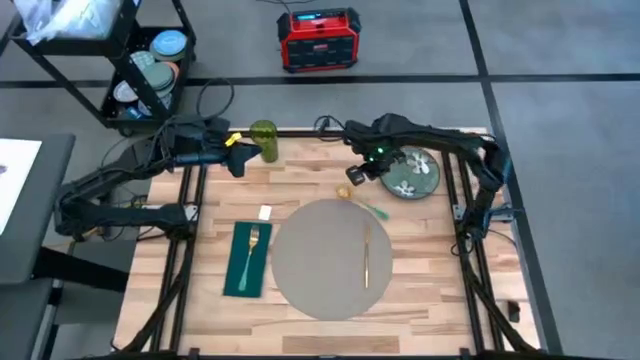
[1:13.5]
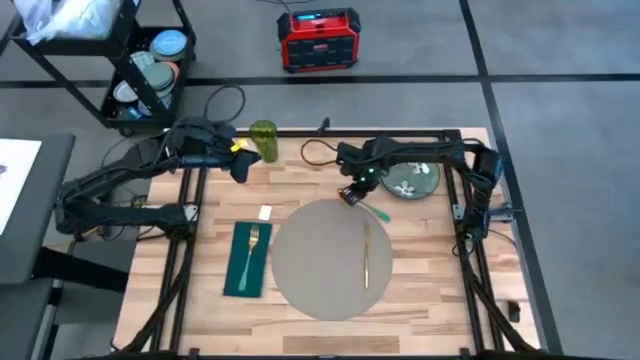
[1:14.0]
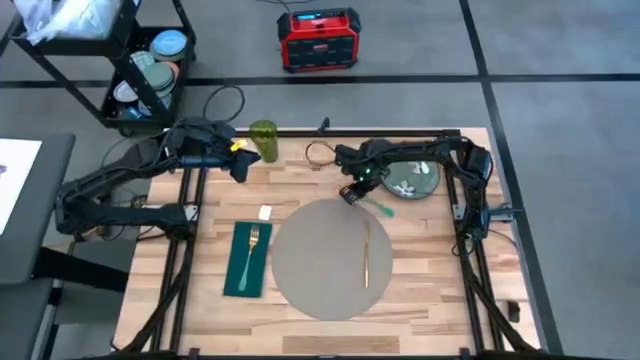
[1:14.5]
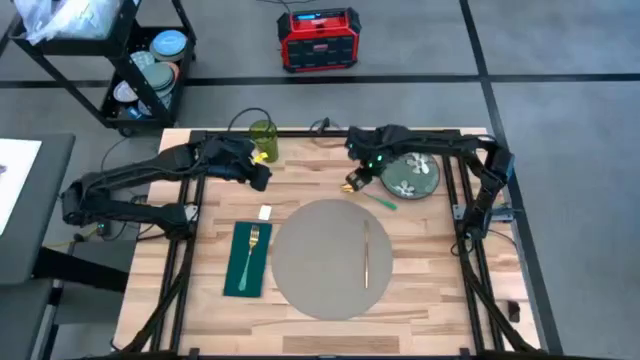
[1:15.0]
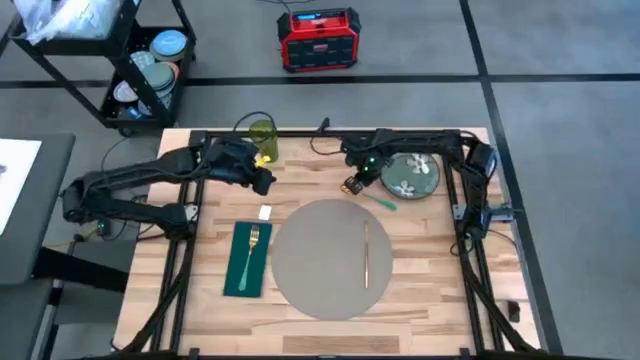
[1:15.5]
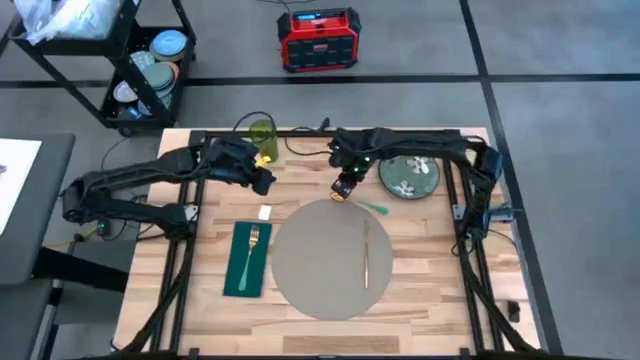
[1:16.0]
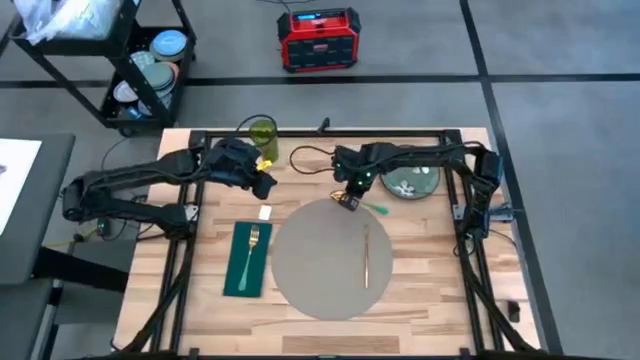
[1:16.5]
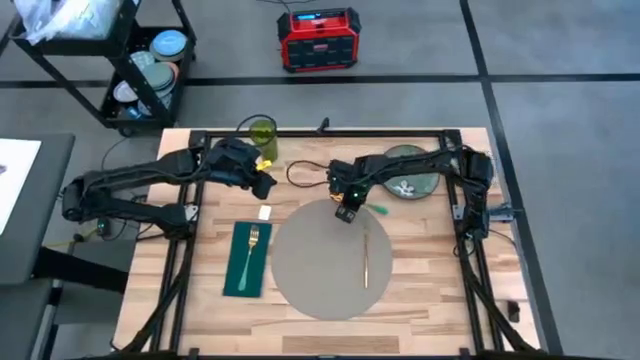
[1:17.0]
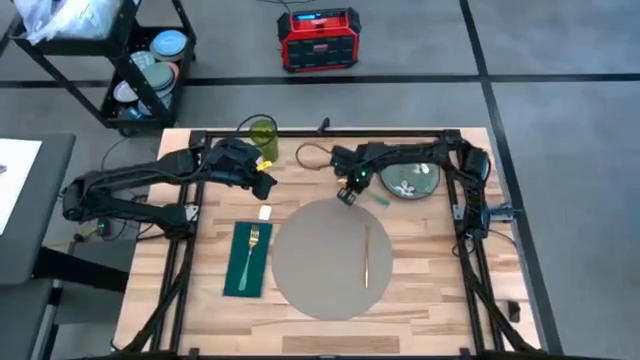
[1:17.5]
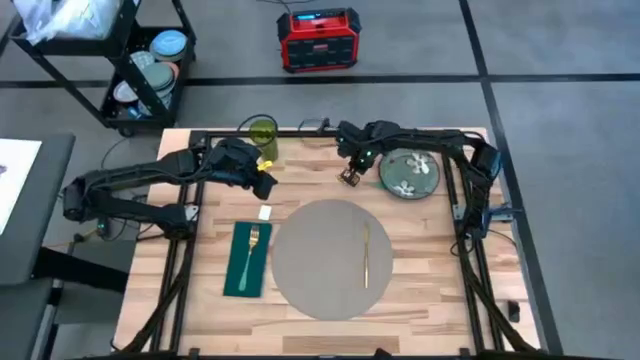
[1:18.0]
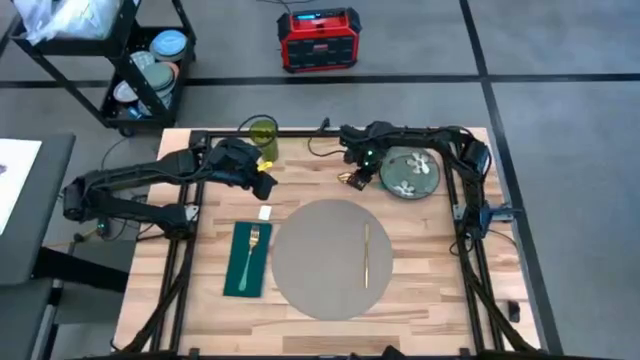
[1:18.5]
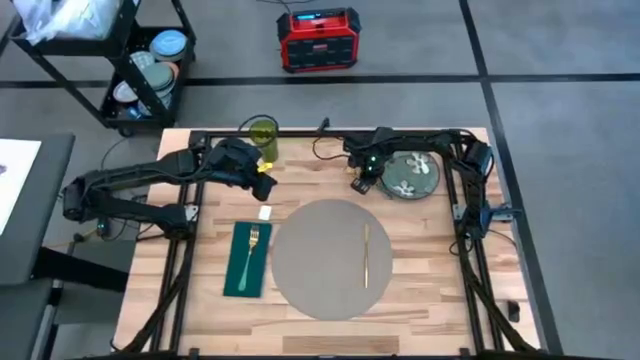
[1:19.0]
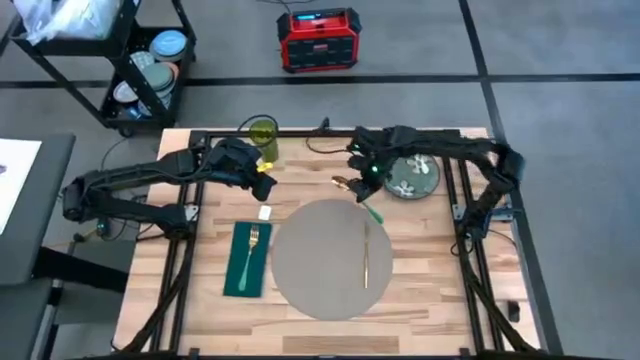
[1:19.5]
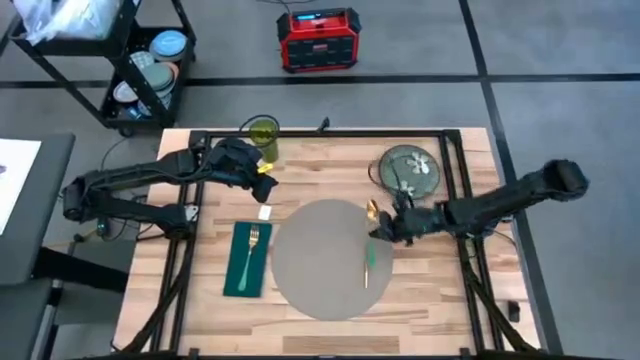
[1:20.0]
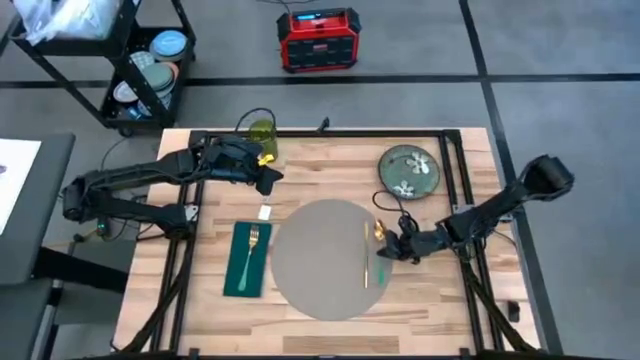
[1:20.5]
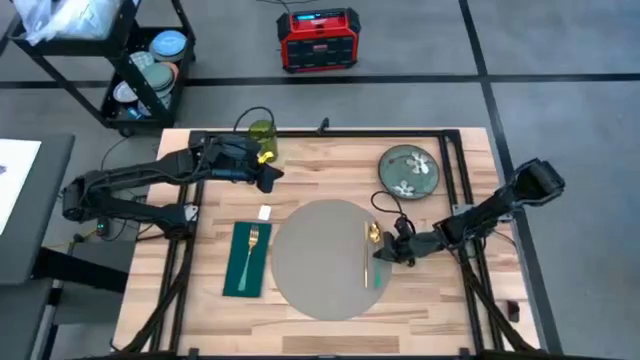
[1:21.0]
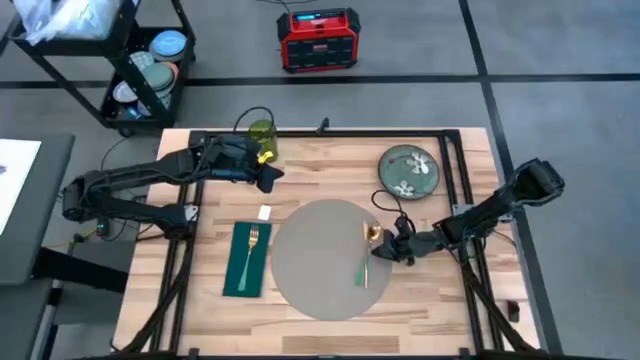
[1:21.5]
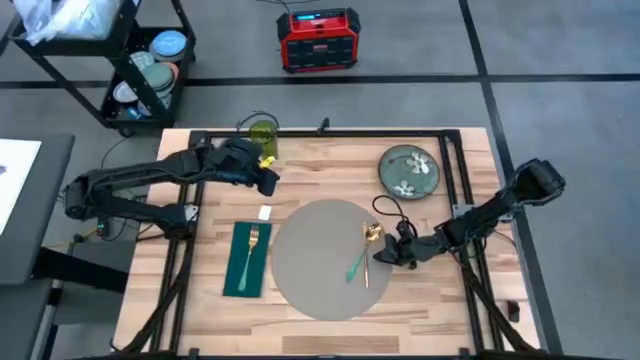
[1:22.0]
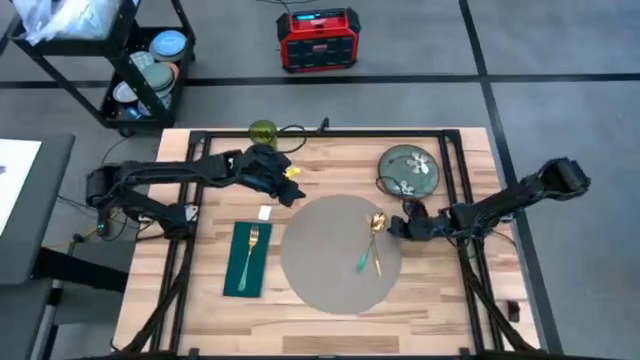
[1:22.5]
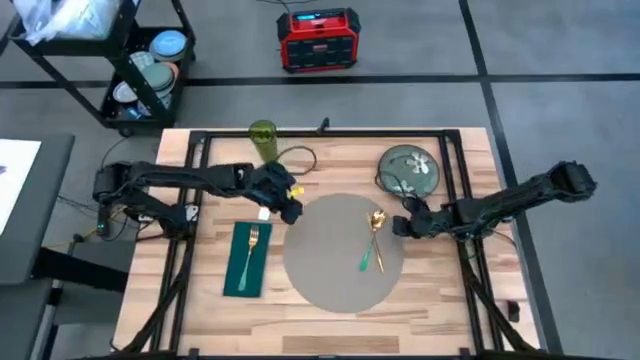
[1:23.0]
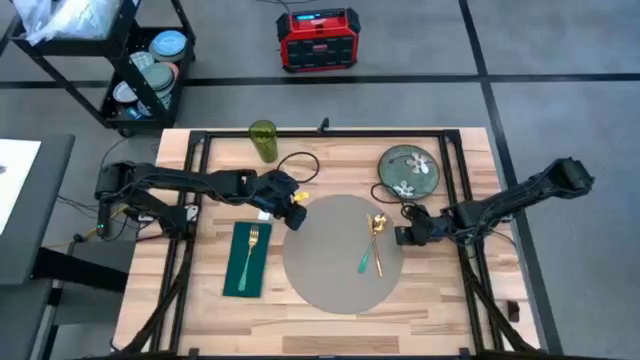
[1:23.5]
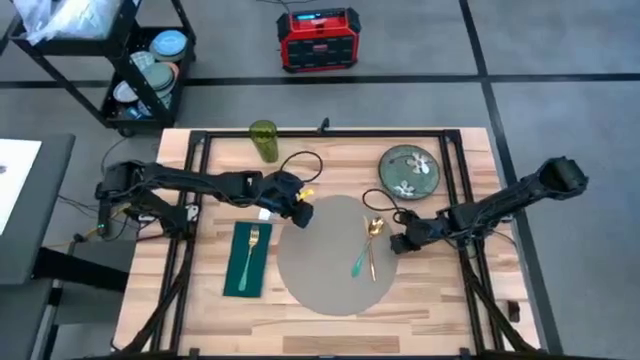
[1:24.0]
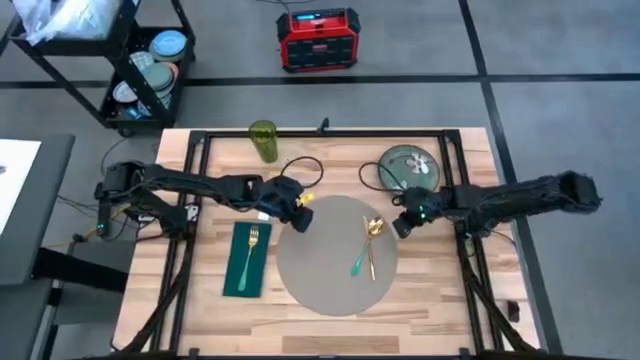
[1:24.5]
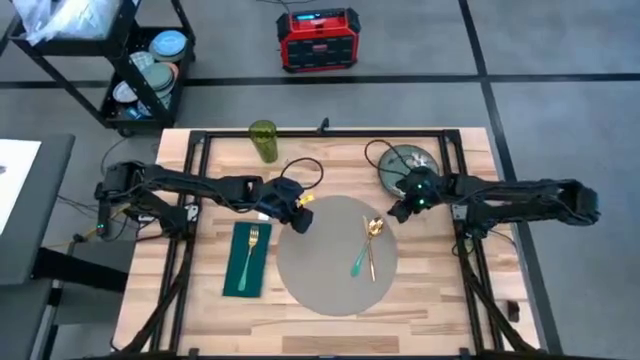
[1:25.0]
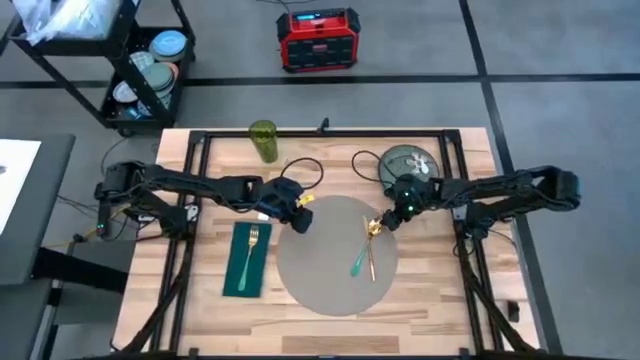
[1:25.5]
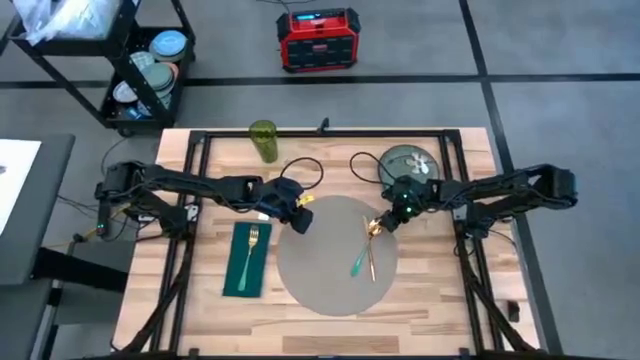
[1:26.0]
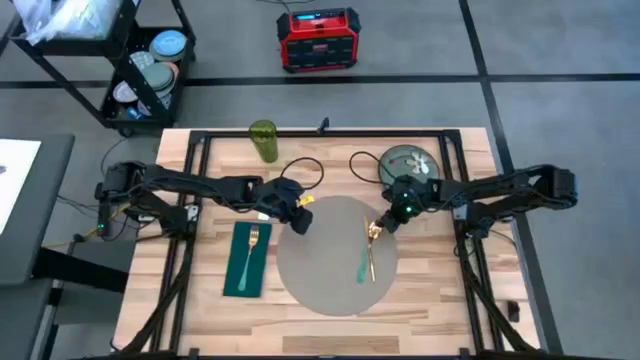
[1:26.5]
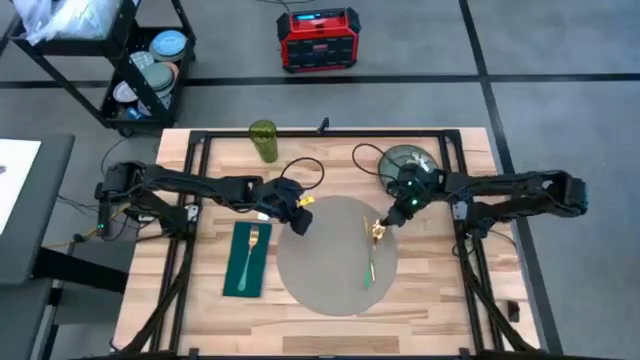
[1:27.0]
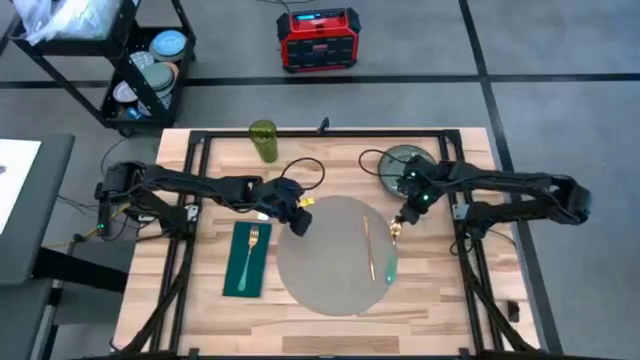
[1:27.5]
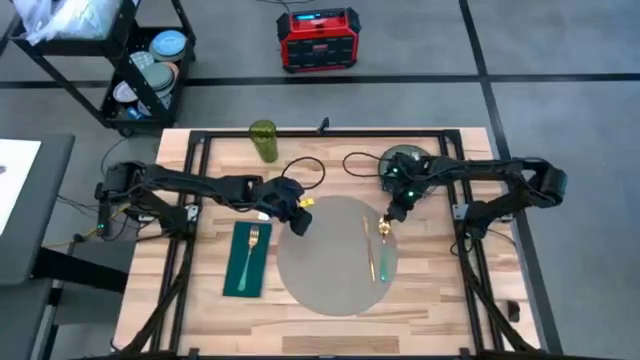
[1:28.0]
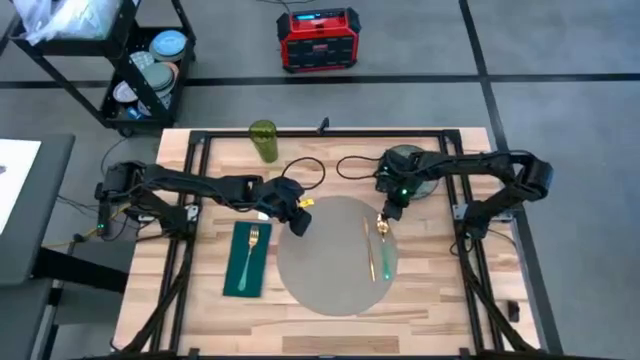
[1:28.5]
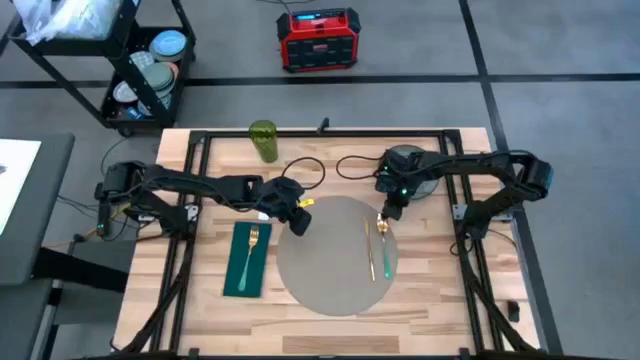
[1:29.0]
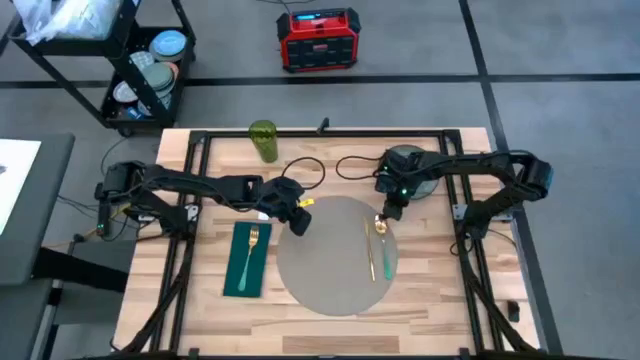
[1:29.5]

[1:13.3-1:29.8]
Task: Set table place
Put the spoon on the gray table mat

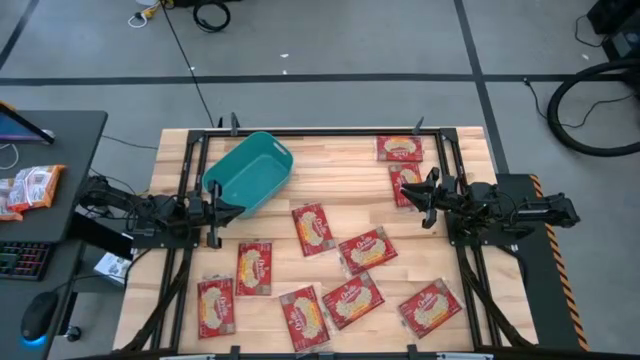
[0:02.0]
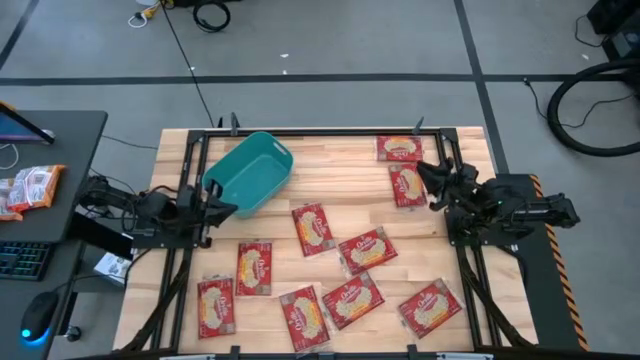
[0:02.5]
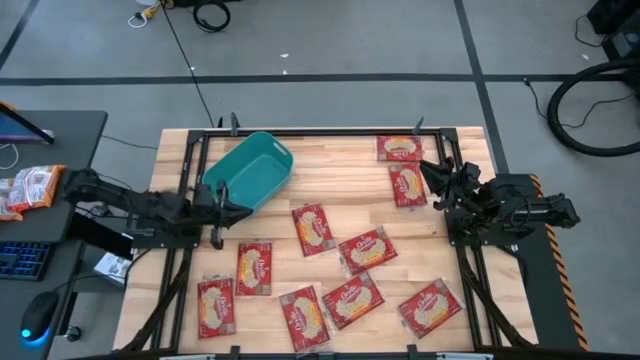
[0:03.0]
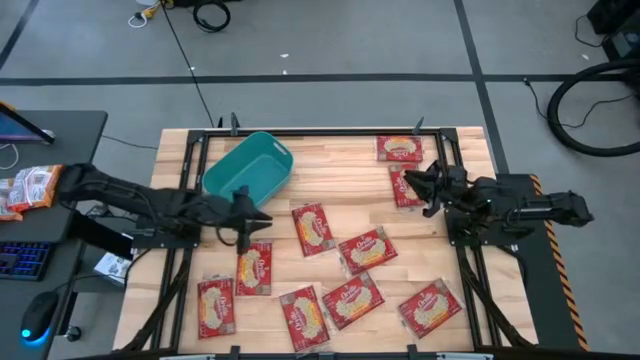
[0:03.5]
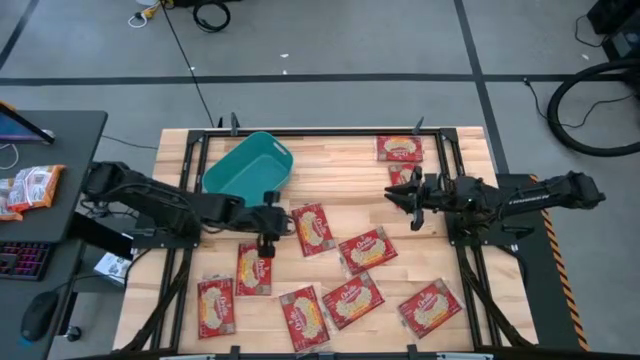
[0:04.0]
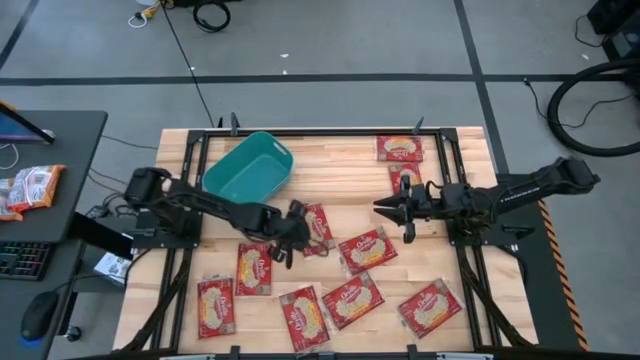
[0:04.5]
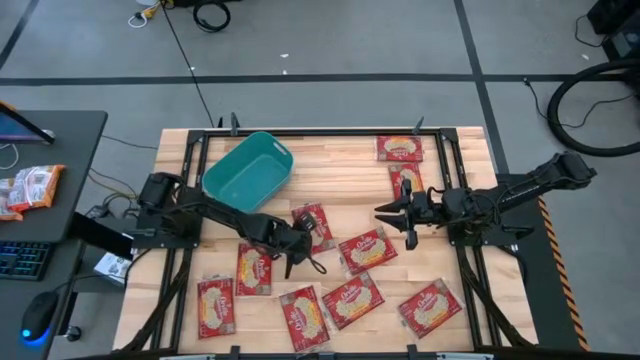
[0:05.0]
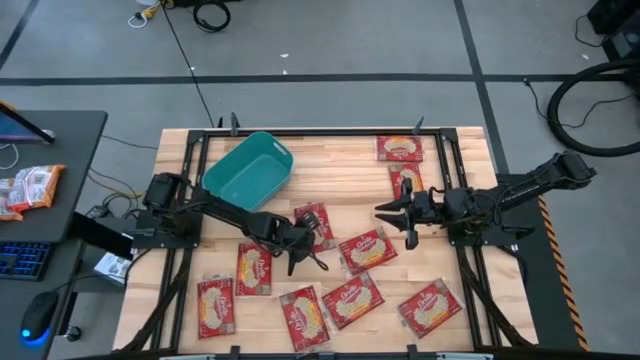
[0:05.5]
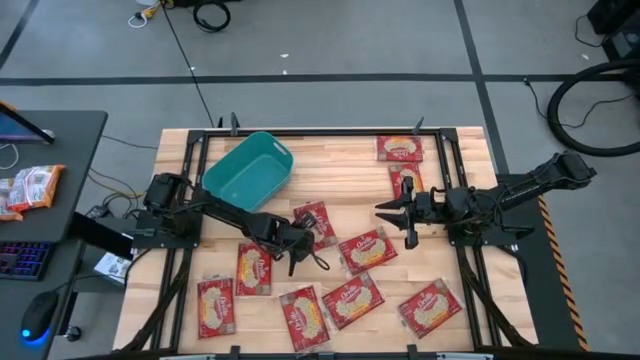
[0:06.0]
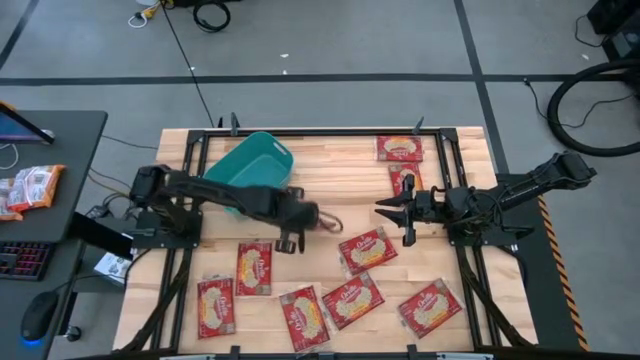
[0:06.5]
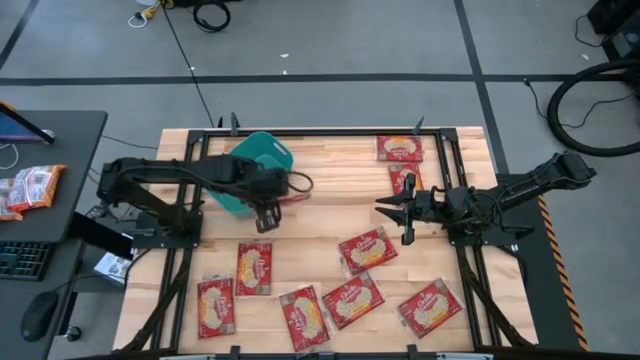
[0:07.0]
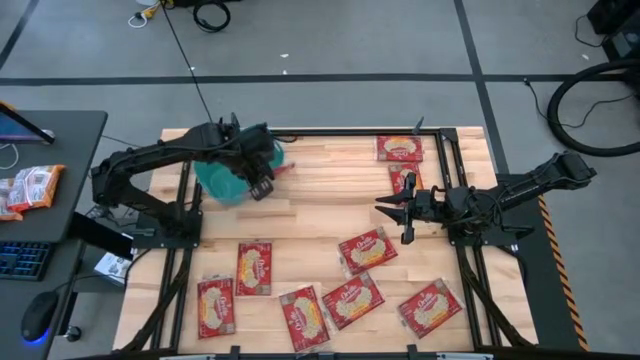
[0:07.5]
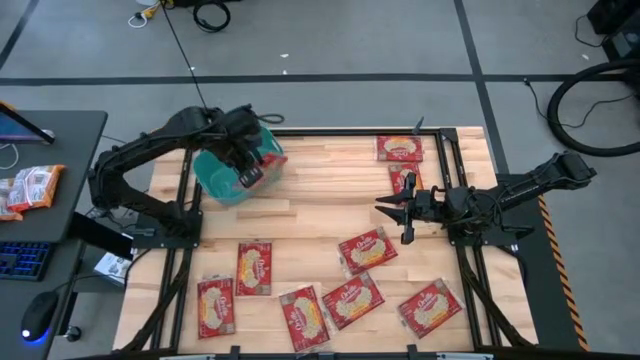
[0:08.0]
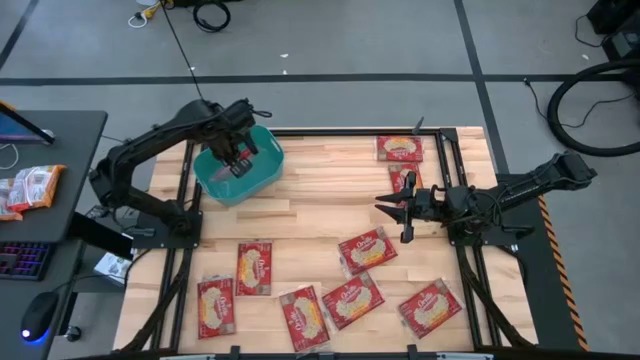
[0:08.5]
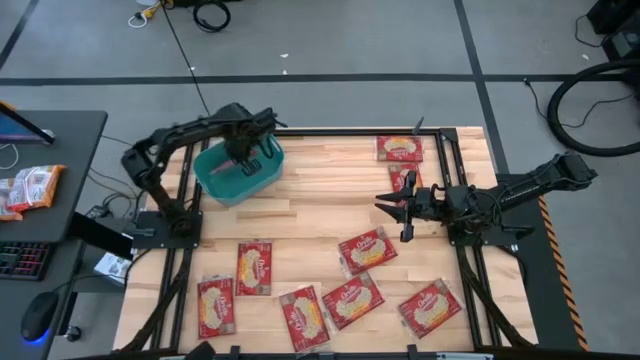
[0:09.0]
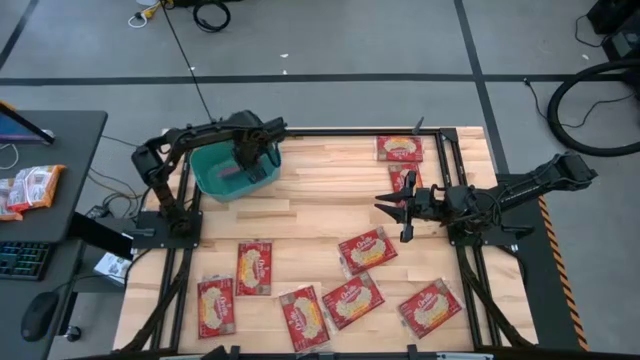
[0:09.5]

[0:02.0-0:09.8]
Task: Sort popcorn bags into baskets
Put the popcorn bag into the bin
